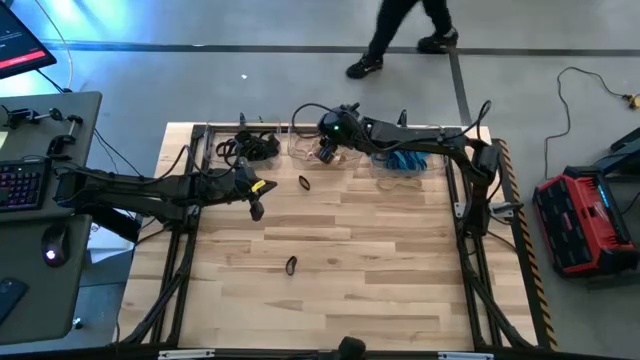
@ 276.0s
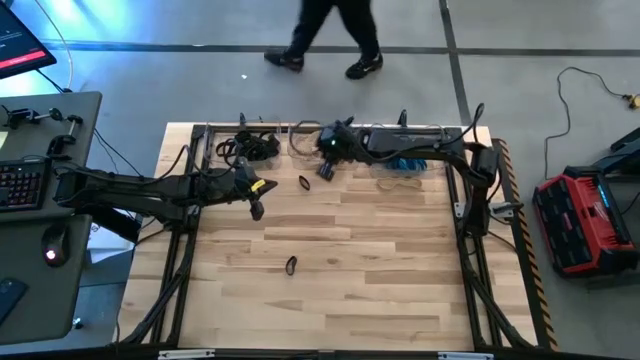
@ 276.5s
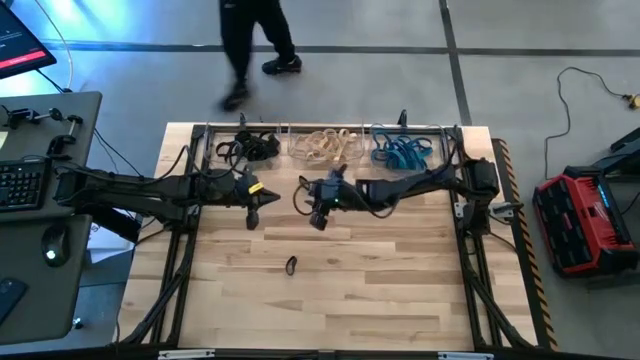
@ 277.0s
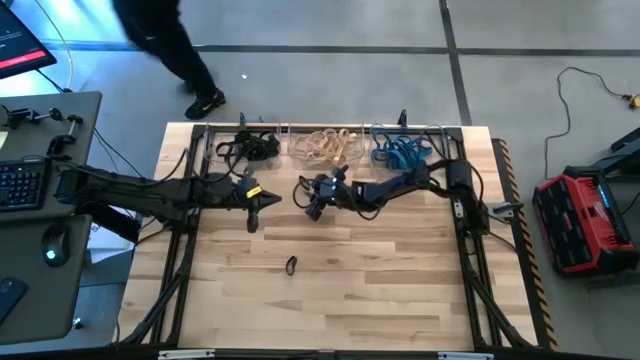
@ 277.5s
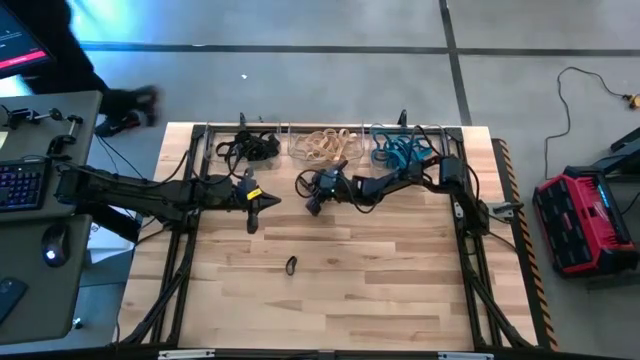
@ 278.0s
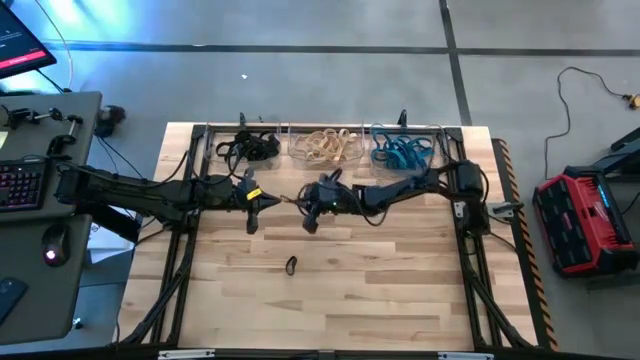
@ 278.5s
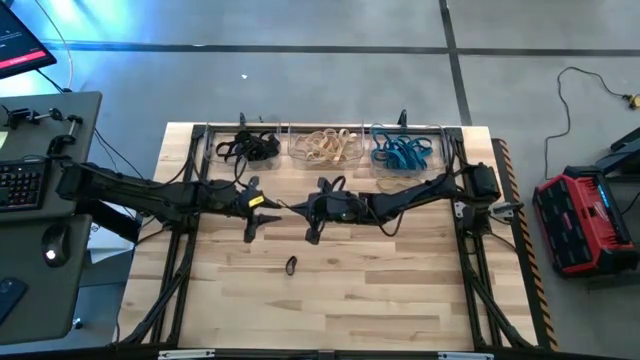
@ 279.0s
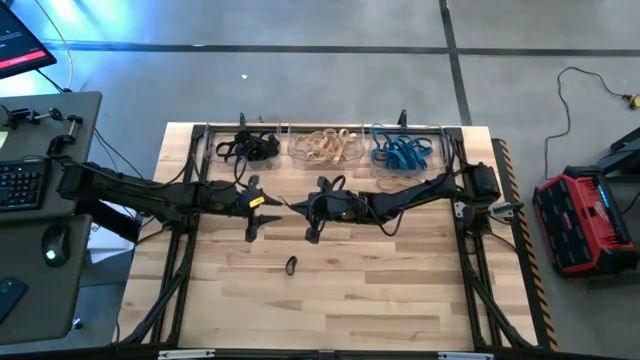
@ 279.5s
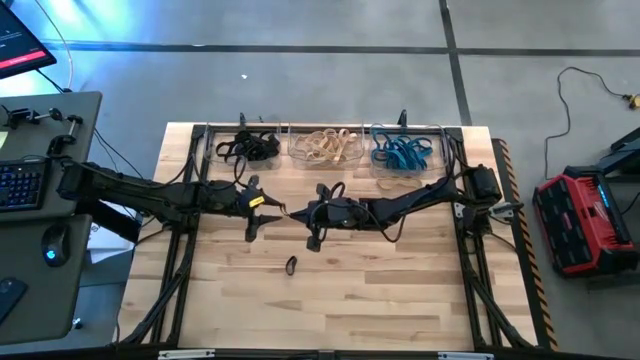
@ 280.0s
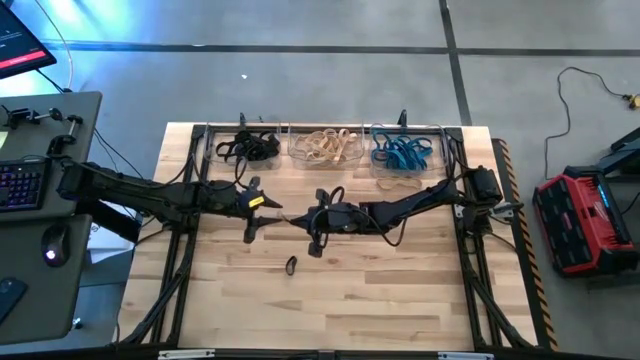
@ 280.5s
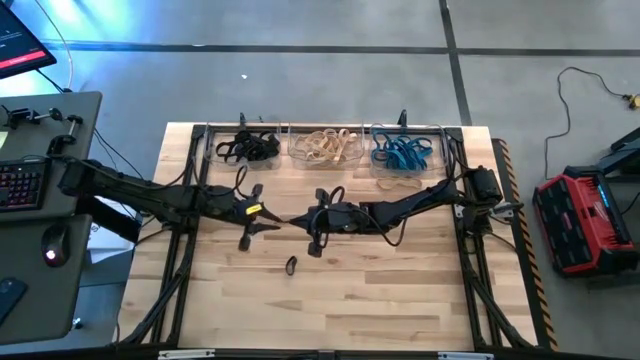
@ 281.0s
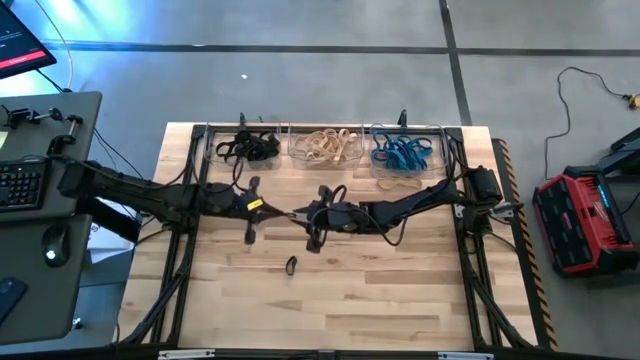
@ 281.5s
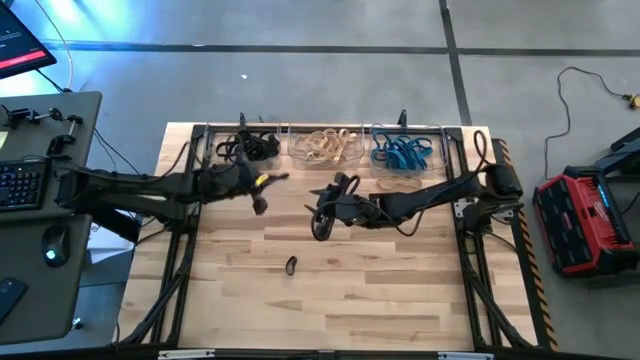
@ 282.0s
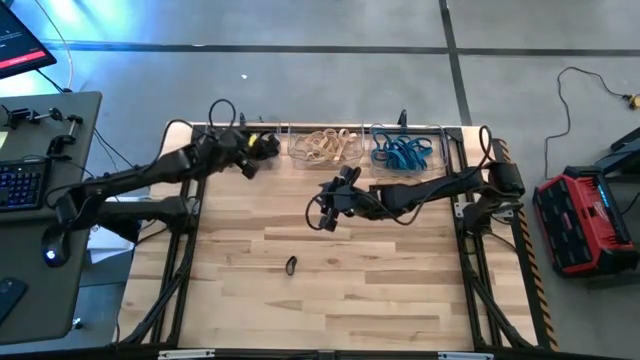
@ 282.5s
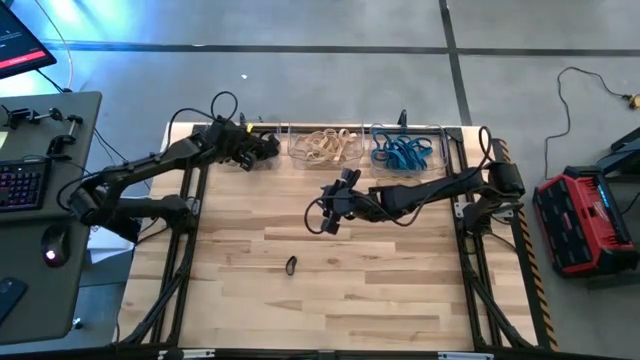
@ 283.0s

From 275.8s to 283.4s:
Task: Sort rubber bands into baskets
Put the black rubber band into the left transparent bin

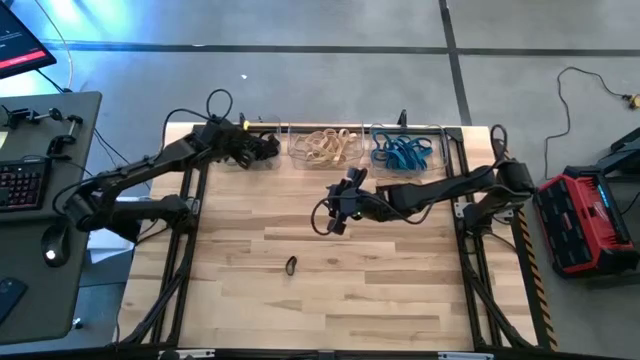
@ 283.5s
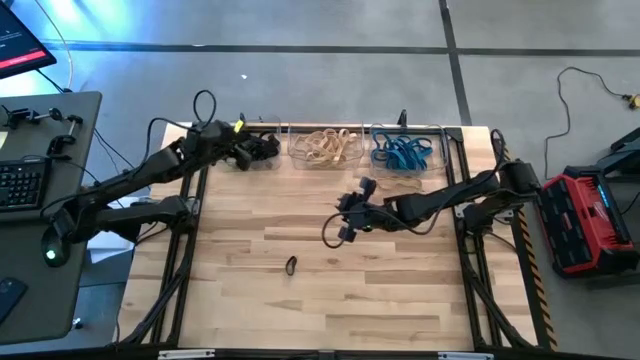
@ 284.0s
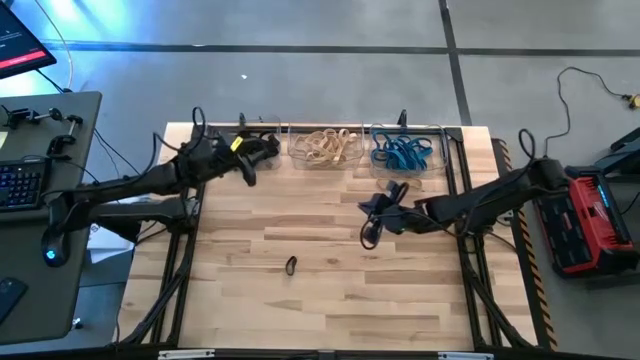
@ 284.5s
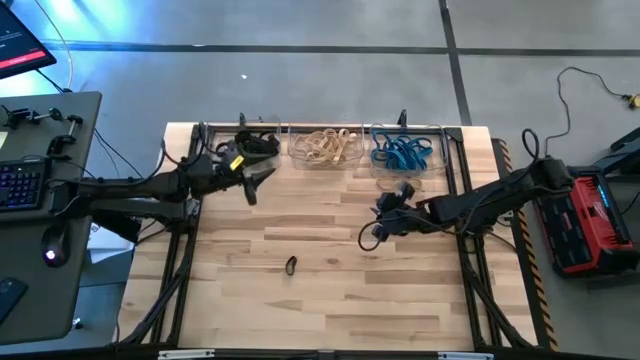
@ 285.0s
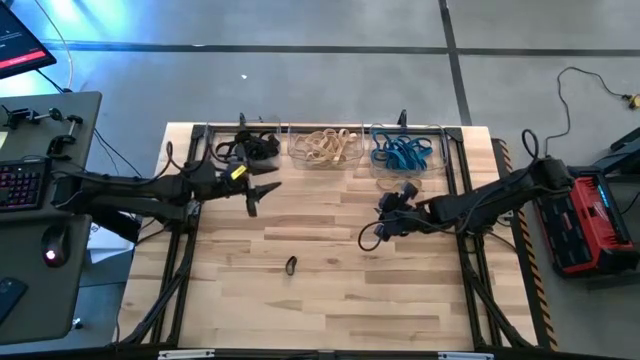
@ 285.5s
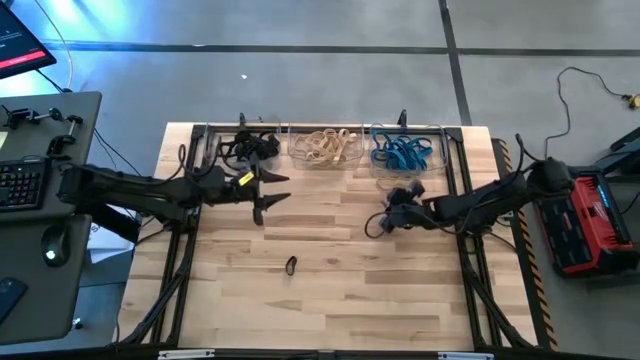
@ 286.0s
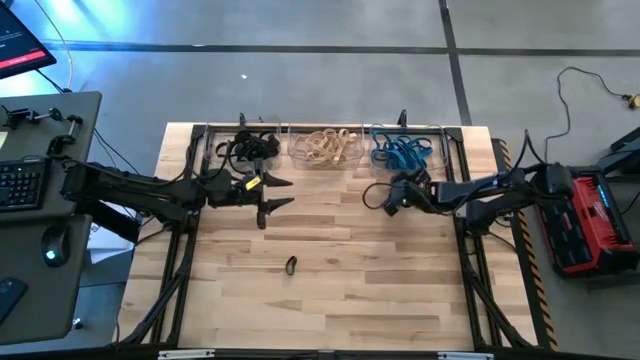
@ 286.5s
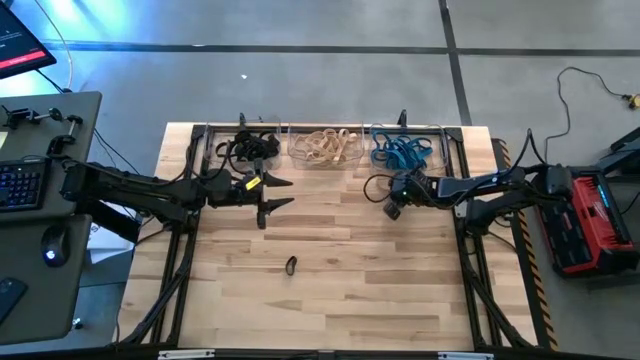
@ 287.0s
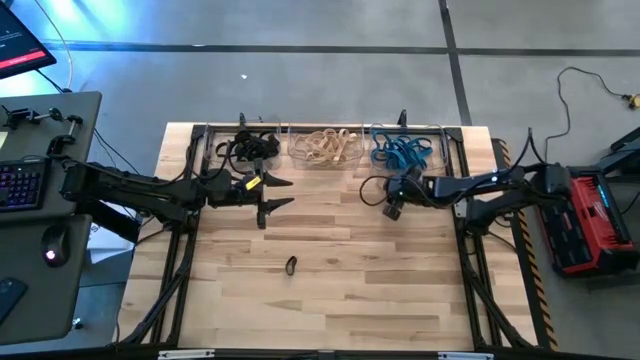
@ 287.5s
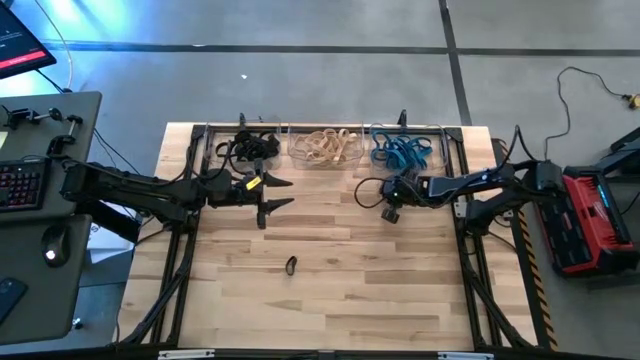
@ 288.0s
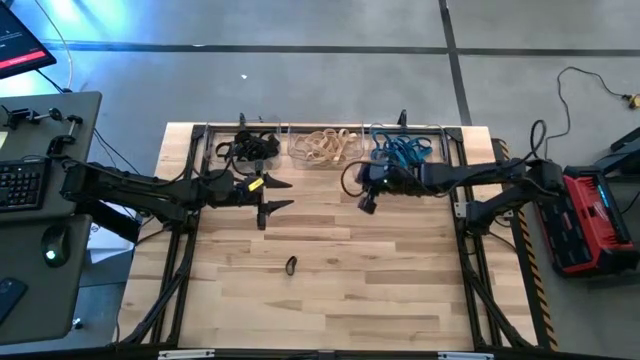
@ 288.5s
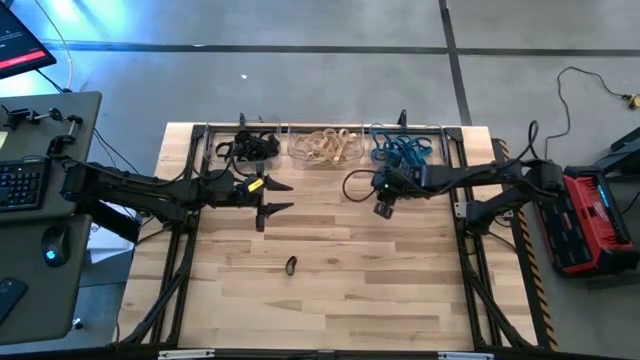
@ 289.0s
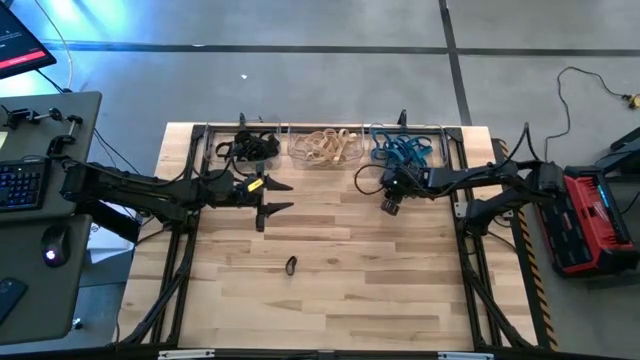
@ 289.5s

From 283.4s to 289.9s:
Put the brown rubber band into the middle transparent bin

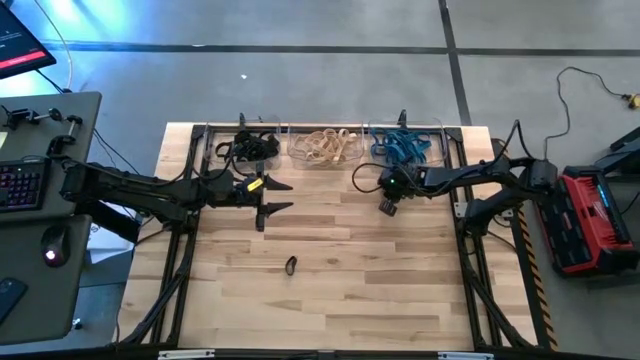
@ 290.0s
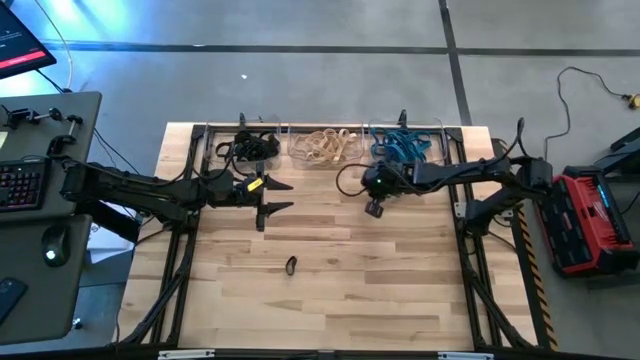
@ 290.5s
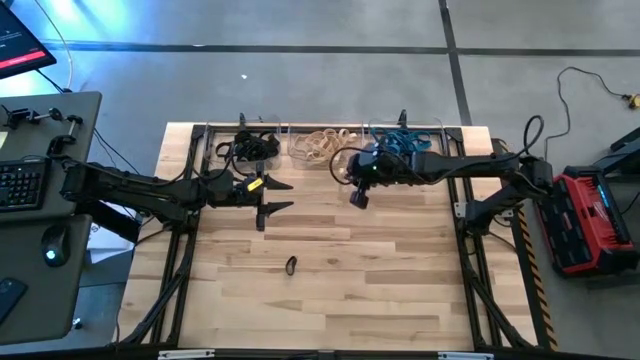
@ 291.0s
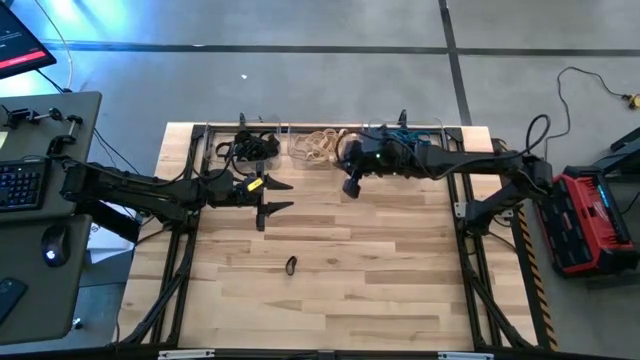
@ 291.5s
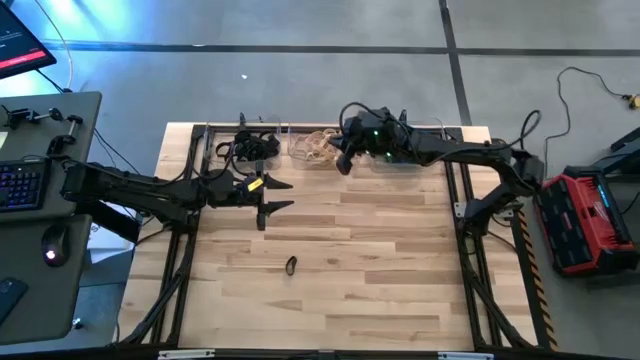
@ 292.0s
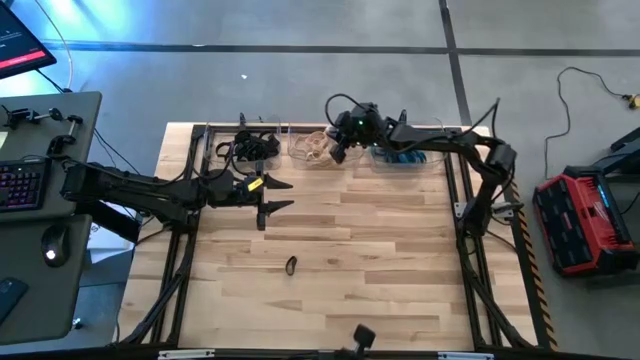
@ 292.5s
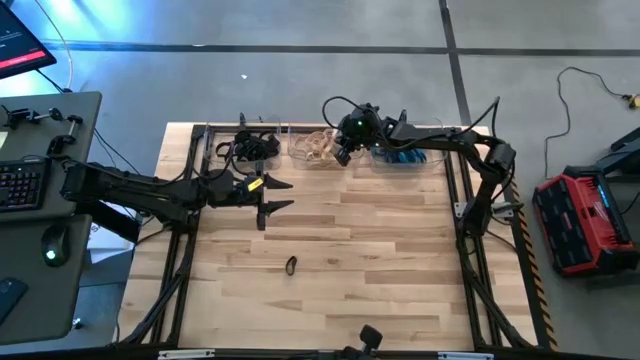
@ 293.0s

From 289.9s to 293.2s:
Put the brown rubber band into the middle transparent bin

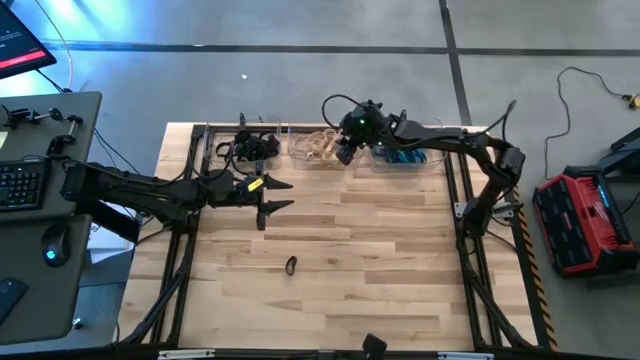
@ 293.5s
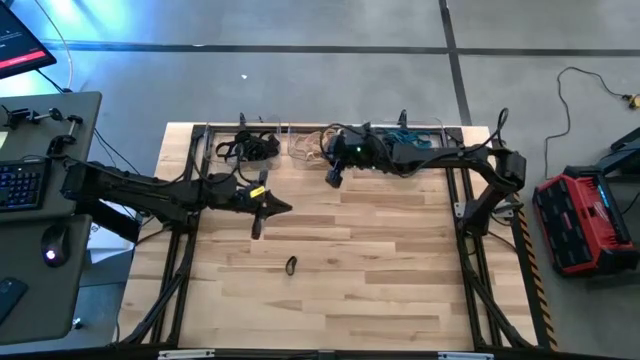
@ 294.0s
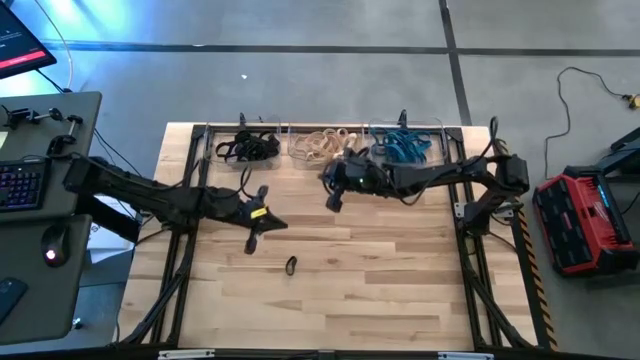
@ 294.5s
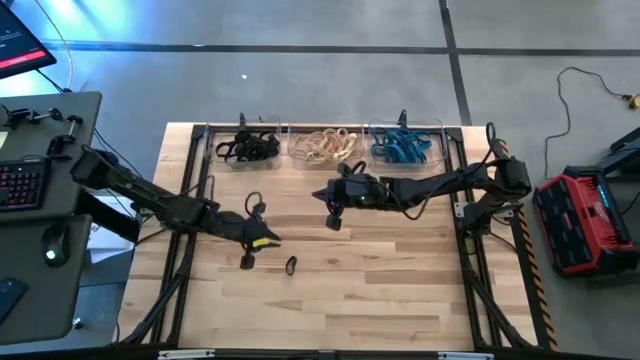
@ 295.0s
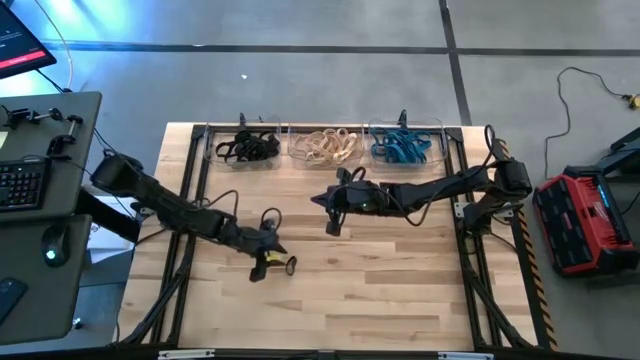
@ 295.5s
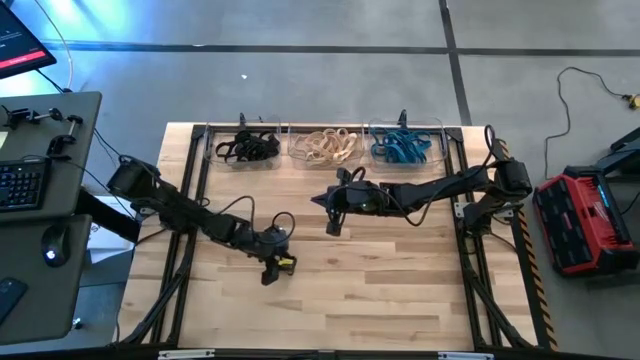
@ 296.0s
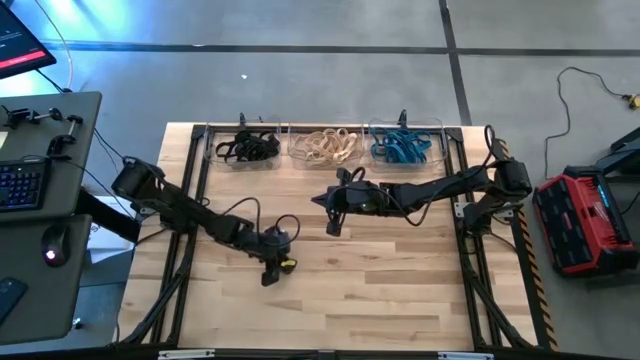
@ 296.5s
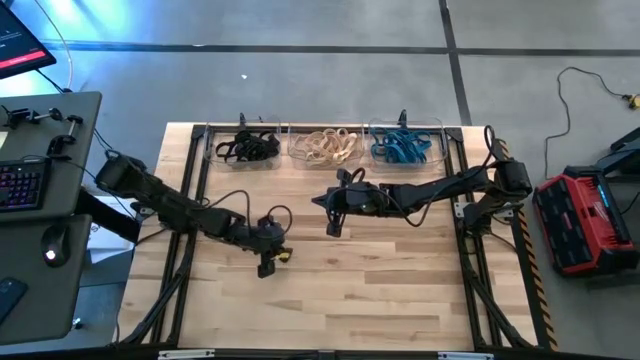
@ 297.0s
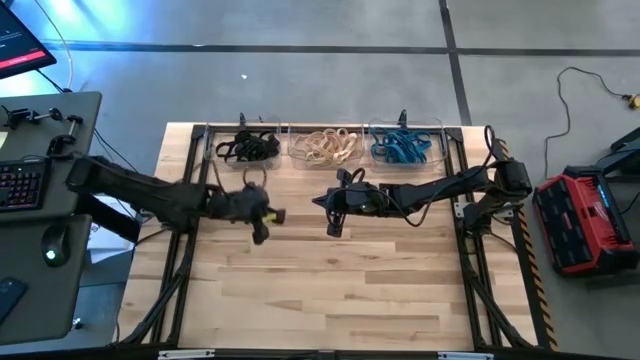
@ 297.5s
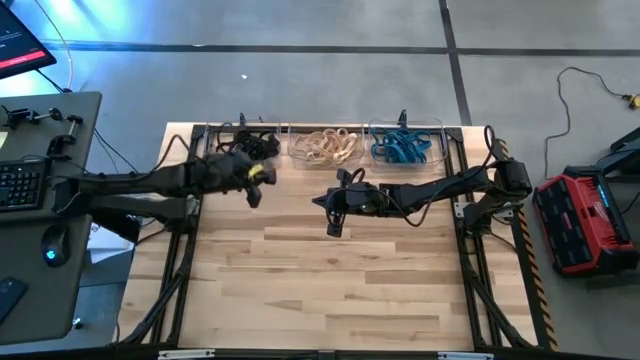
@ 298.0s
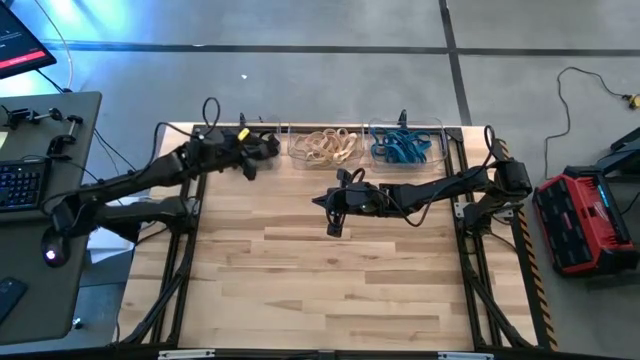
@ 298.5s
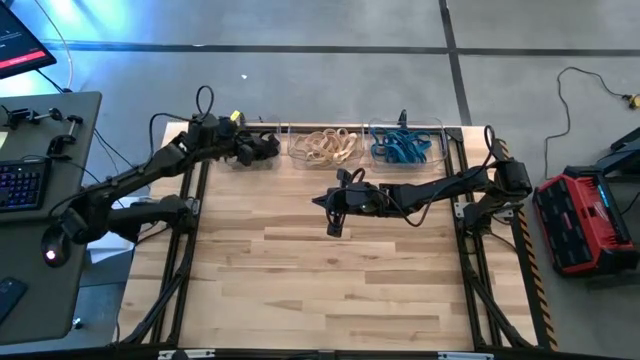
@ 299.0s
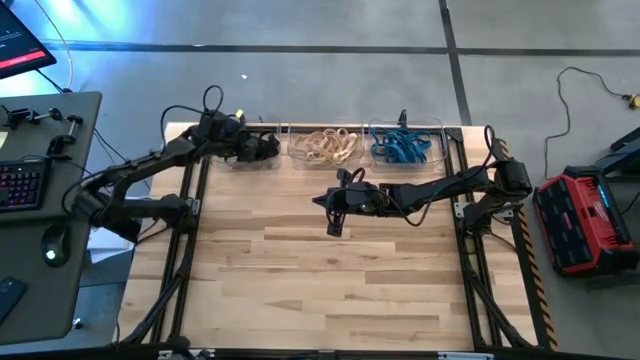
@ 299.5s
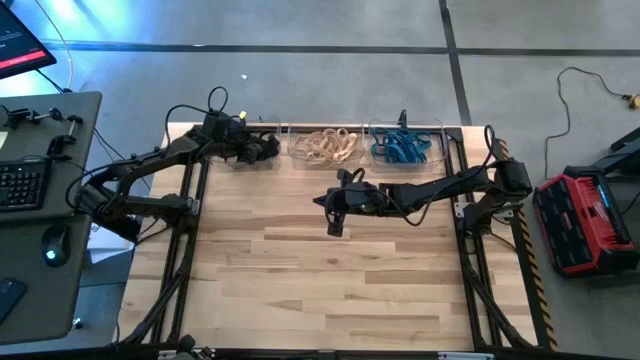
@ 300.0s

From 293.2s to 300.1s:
Put the black rubber band into the left transparent bin
